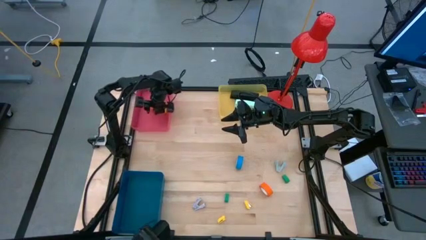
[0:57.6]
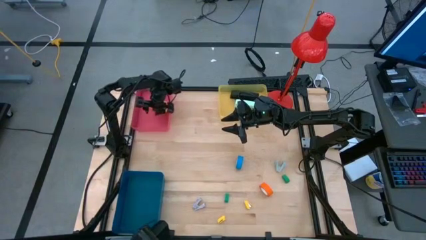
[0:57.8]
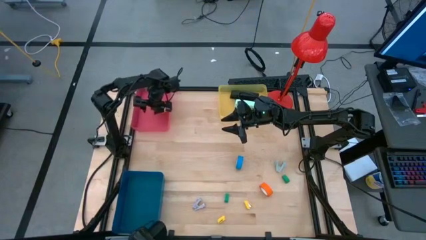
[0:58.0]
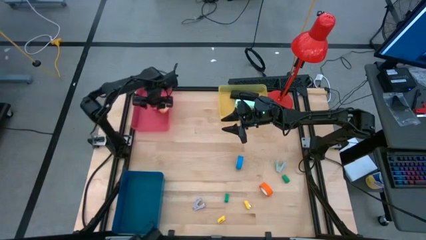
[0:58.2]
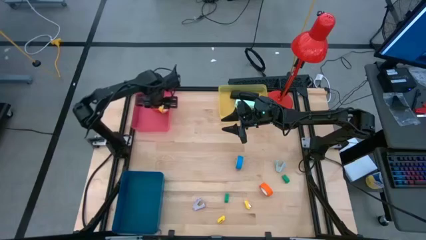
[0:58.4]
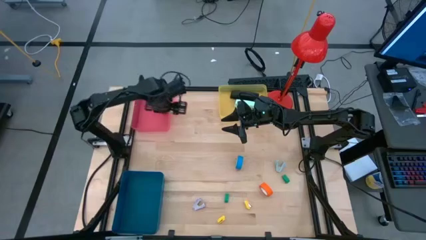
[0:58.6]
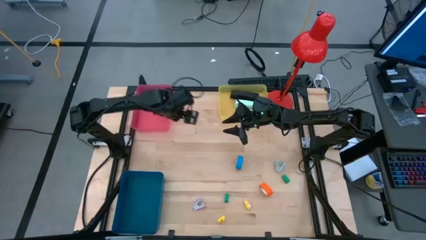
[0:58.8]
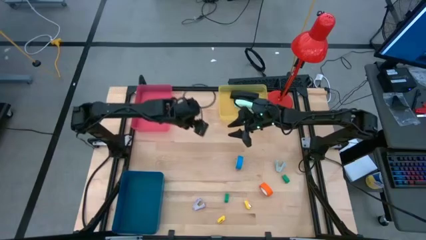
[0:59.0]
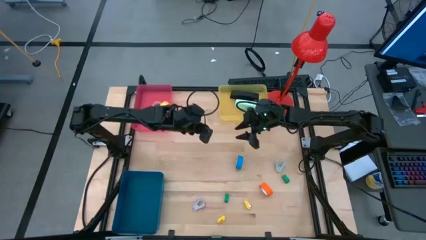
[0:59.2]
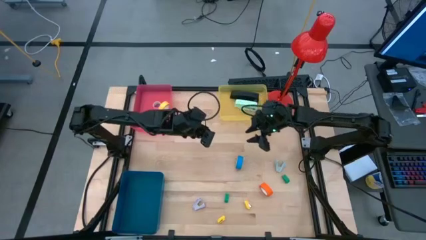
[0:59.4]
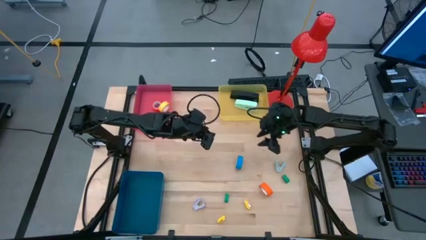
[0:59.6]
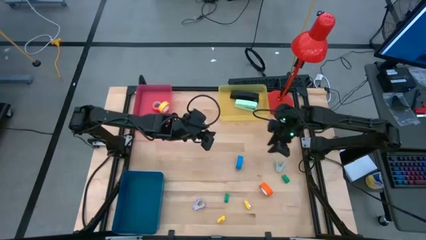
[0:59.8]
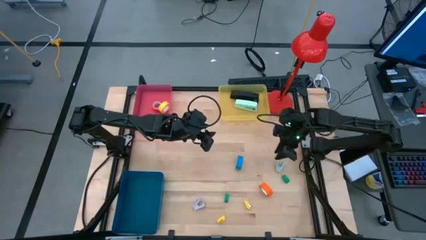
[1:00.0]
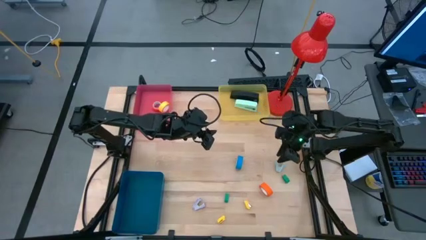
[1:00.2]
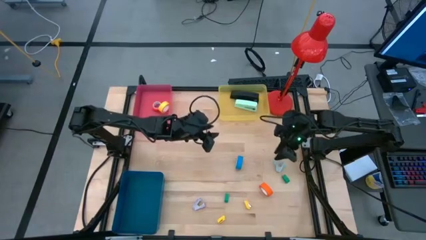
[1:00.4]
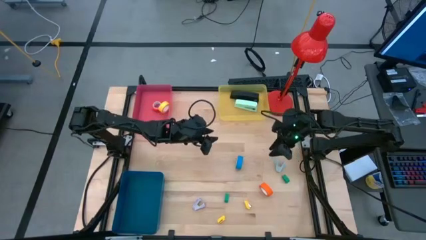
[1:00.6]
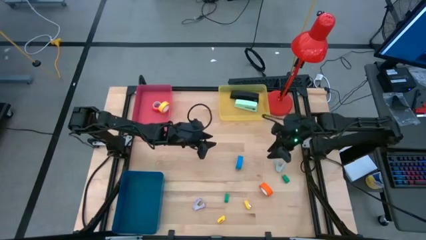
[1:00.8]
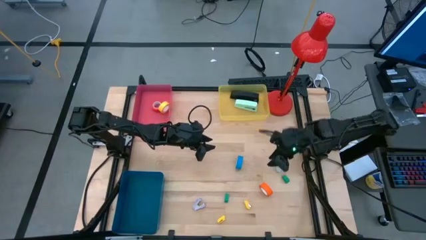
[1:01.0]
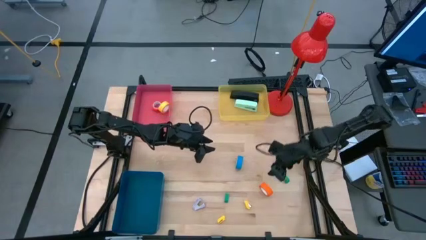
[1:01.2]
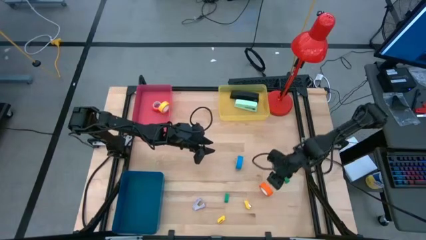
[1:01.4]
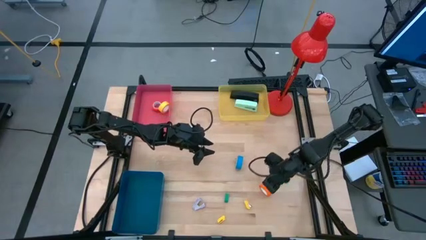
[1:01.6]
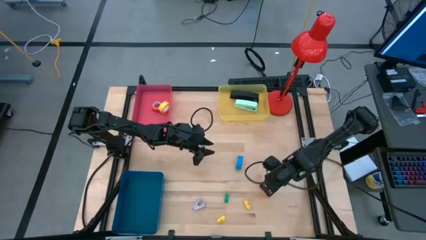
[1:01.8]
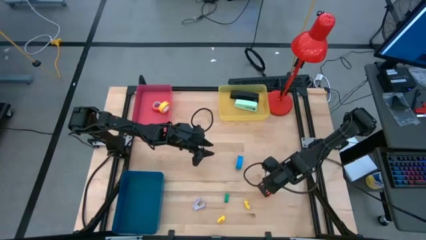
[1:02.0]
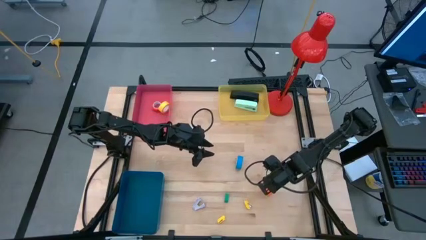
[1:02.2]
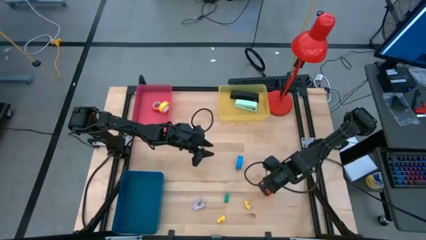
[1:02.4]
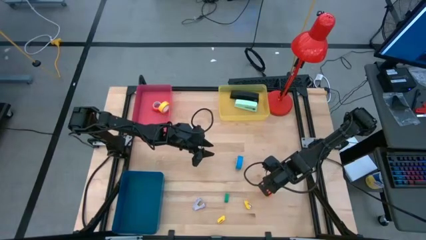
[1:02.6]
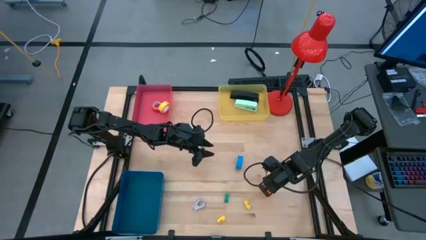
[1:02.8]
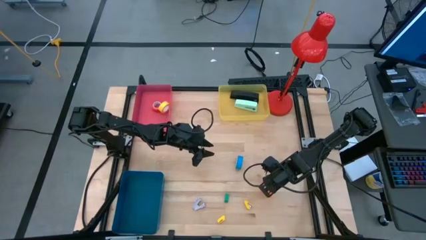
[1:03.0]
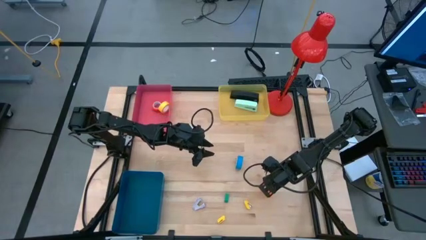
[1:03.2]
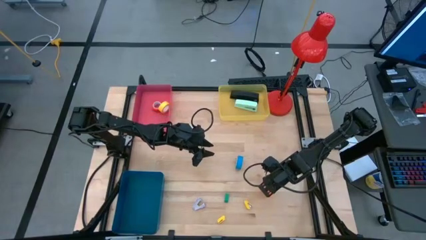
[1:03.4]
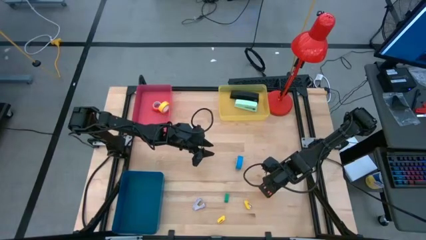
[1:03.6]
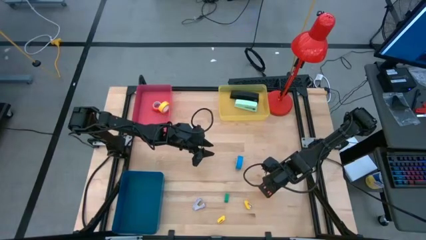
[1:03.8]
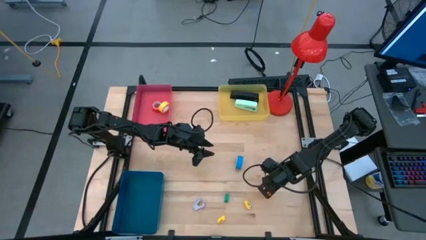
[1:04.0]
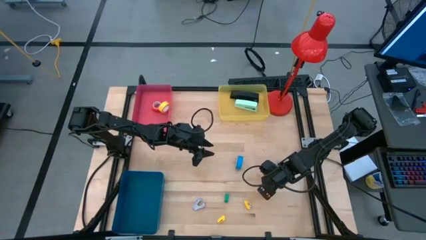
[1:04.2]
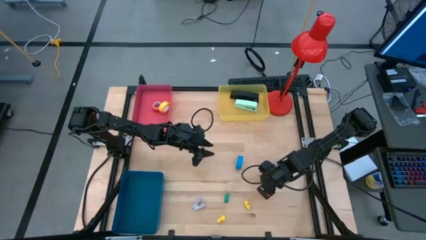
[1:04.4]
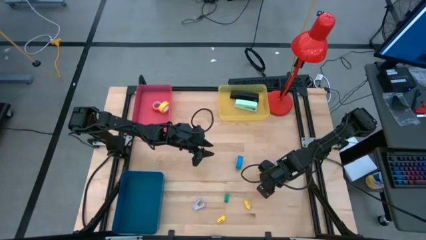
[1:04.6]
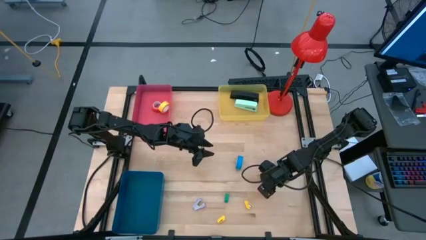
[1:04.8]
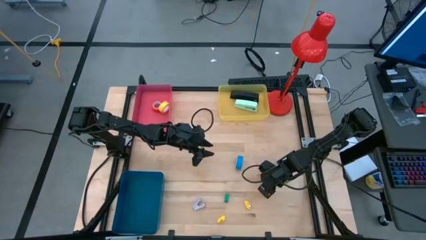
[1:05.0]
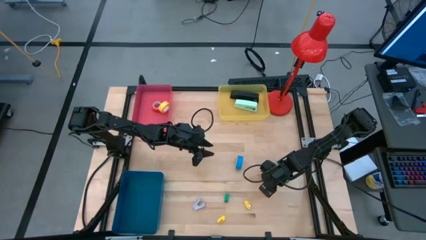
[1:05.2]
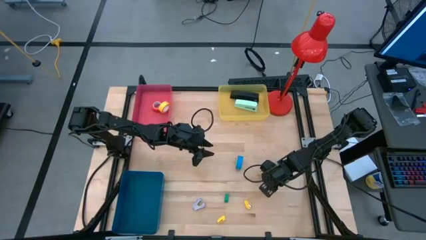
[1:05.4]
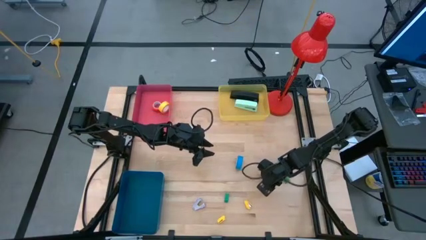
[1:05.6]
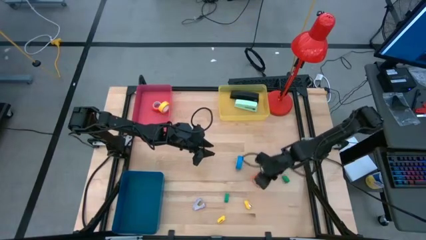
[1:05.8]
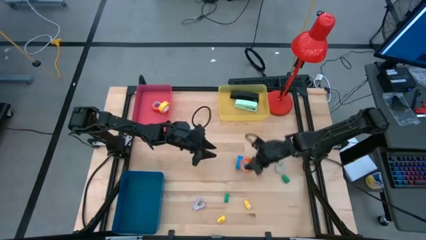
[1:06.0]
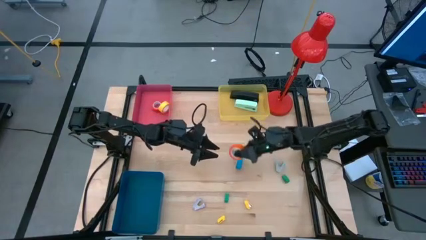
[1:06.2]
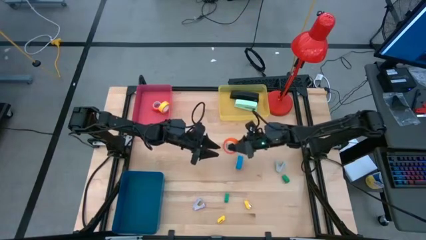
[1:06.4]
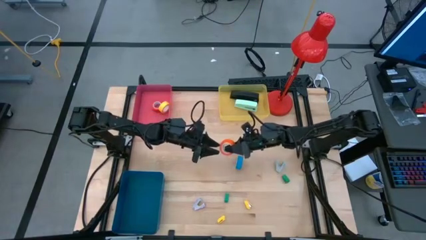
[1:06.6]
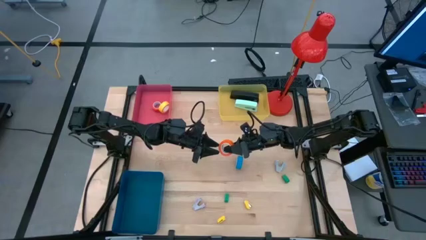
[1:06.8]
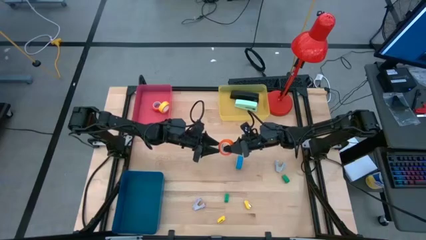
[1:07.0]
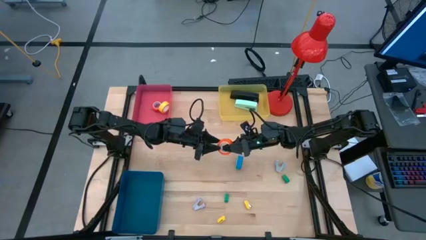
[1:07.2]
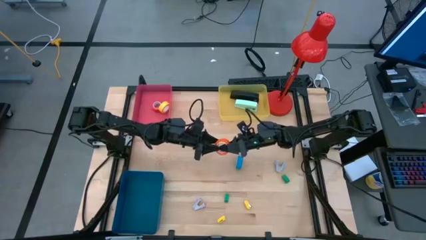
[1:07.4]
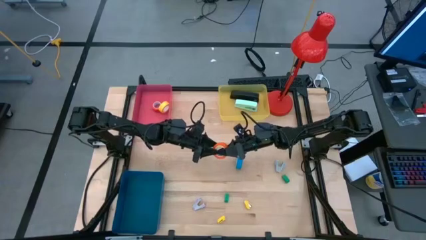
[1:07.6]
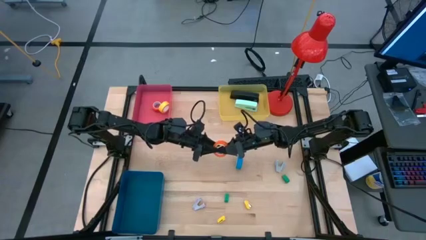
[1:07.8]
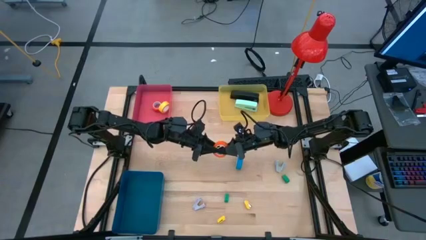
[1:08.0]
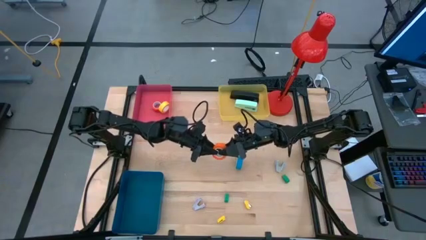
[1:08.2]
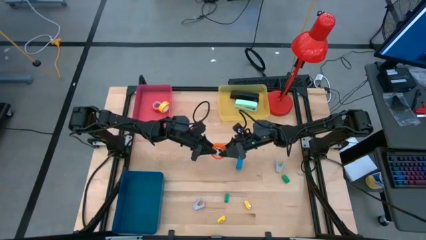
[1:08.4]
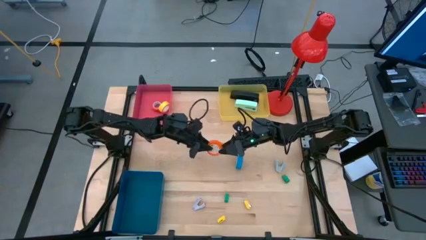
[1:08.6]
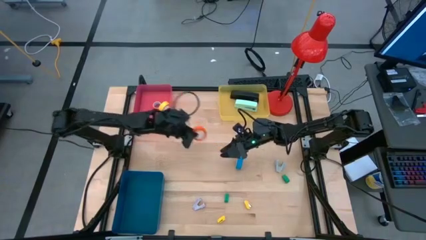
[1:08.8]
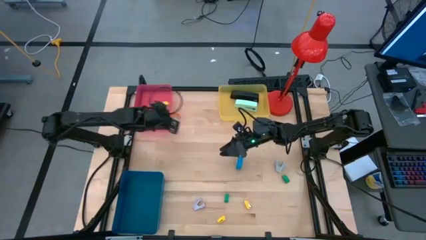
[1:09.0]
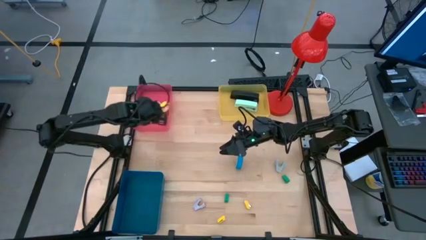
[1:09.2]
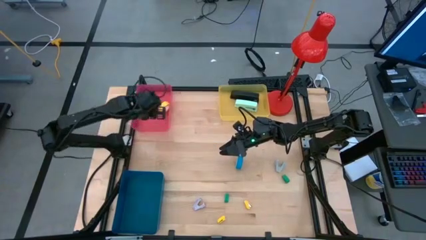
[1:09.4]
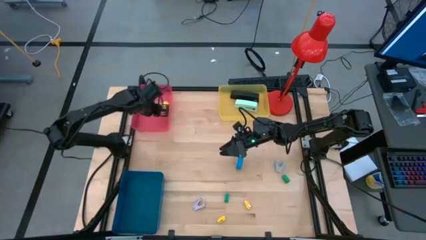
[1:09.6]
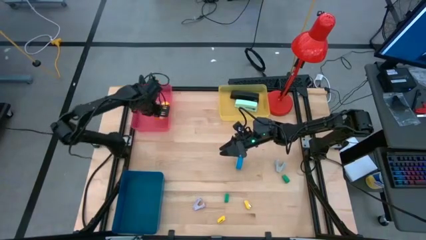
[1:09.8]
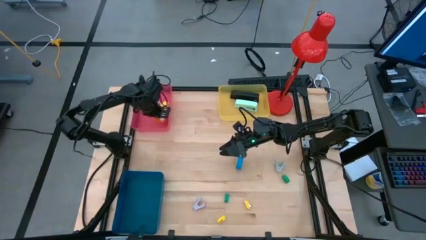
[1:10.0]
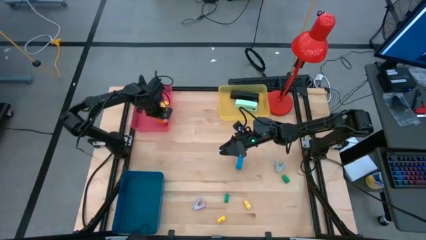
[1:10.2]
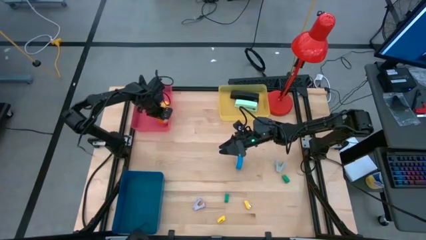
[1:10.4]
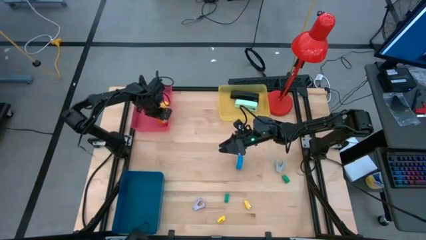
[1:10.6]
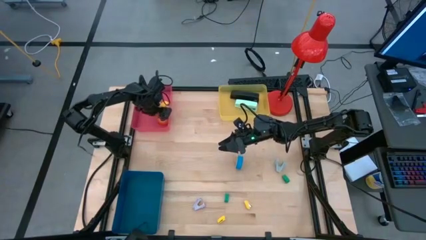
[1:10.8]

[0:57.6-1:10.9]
Task: Pick and place Stapler, Stapler remover, tape
Put the orange tape into the pink bin

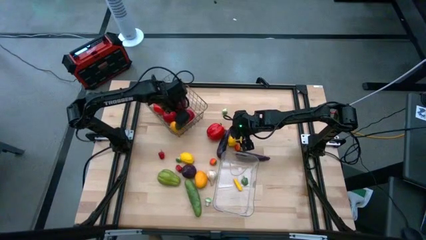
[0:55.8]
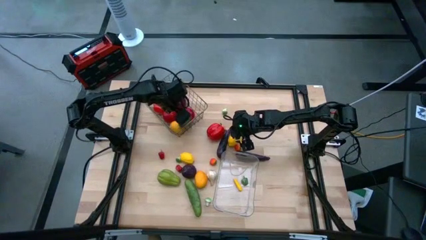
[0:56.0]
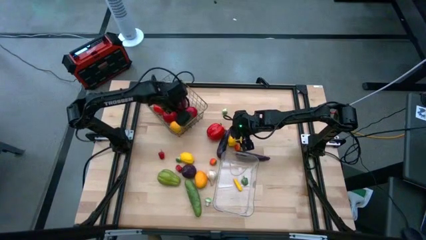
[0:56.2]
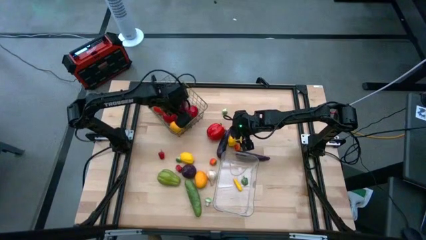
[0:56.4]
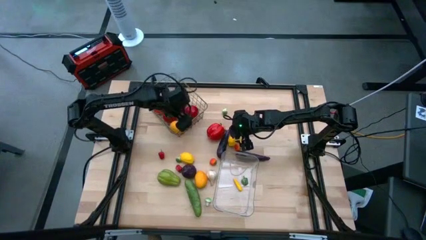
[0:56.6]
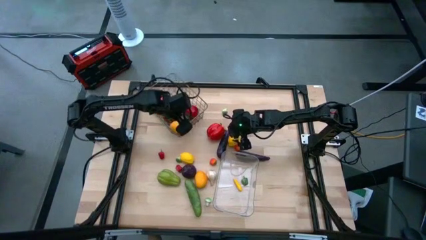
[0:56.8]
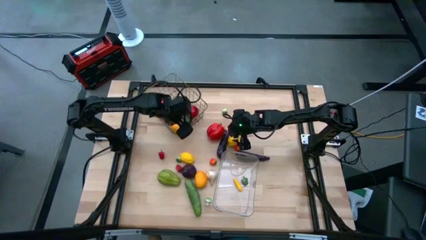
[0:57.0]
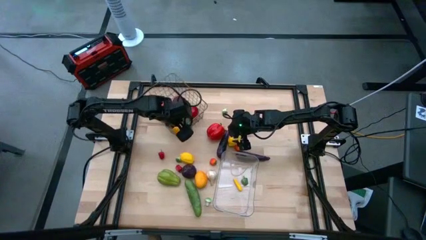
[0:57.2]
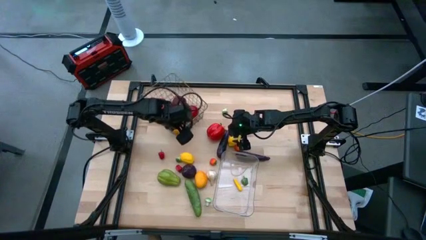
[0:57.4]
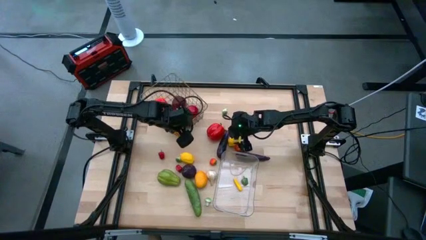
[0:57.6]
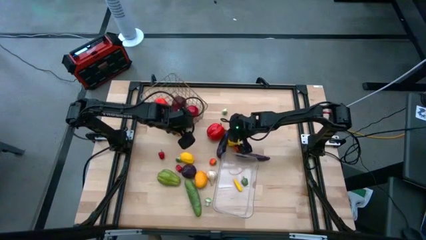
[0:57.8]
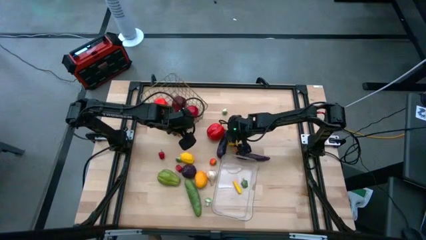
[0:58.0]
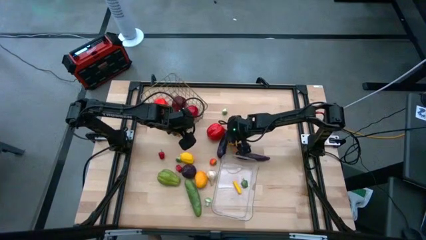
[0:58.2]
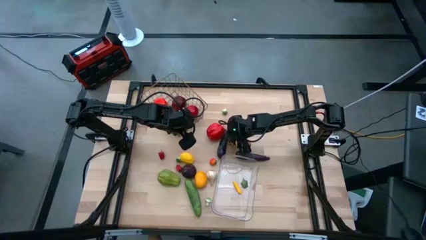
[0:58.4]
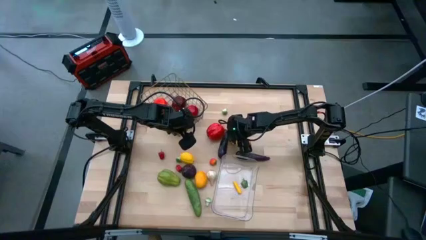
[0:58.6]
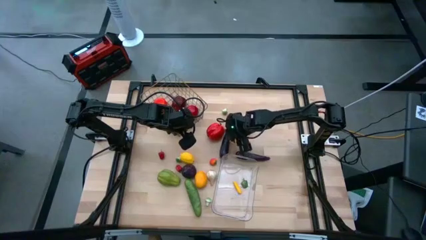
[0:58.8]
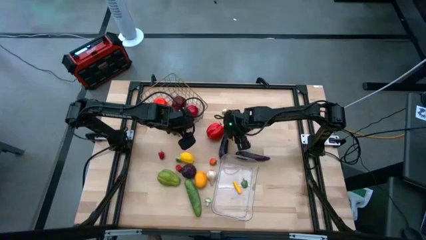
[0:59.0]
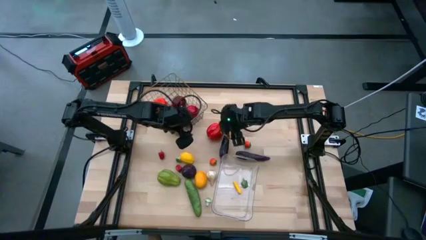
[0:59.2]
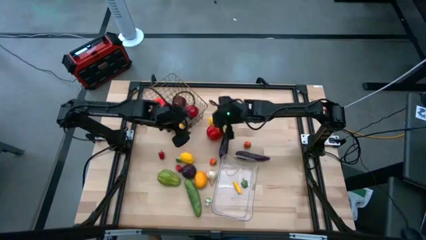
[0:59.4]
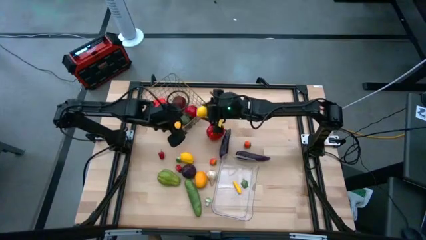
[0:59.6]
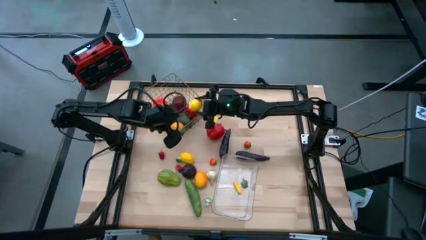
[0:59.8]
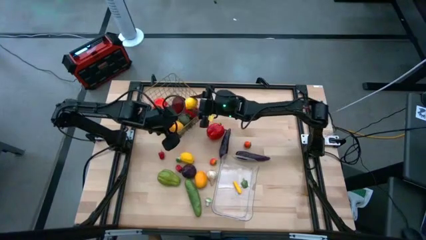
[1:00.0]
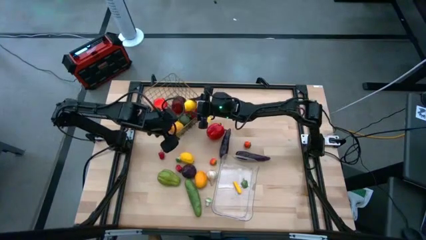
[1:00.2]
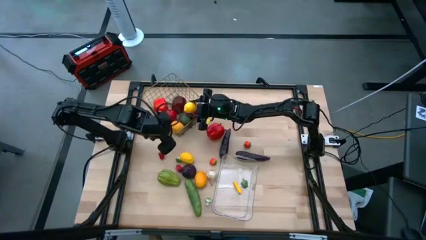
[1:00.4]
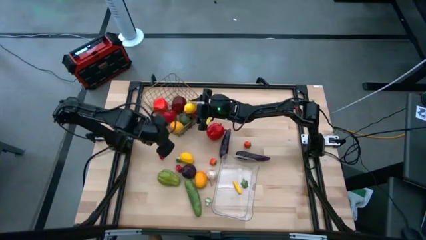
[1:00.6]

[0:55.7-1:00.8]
Task: Sort produce into baskets
Put the yellow lemon into the wire basket
